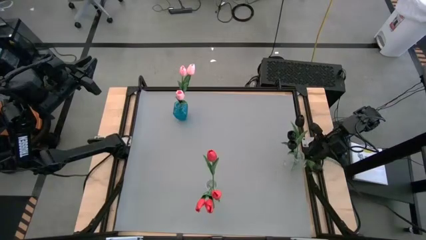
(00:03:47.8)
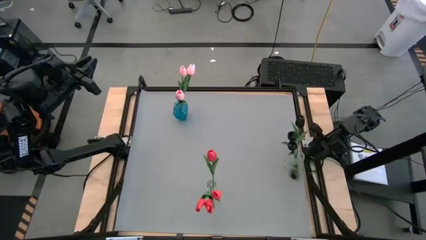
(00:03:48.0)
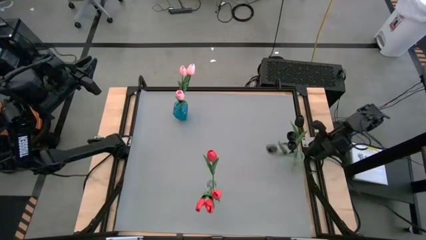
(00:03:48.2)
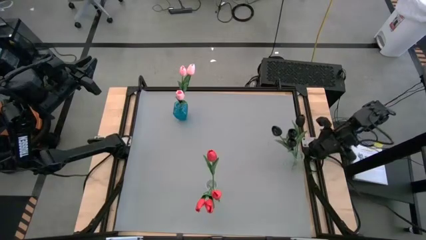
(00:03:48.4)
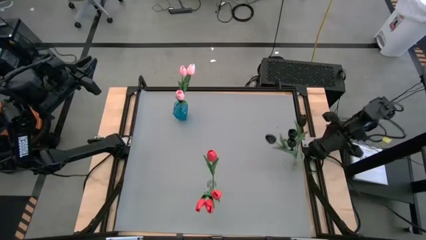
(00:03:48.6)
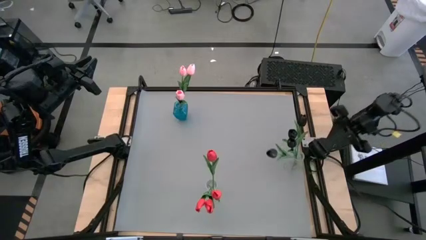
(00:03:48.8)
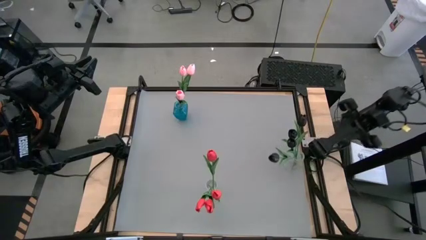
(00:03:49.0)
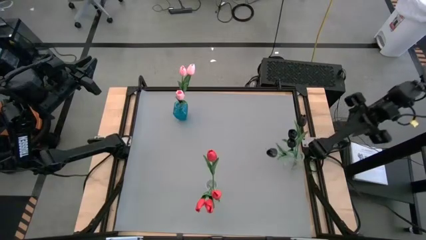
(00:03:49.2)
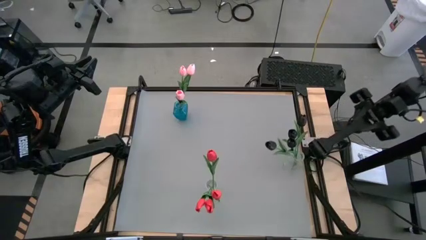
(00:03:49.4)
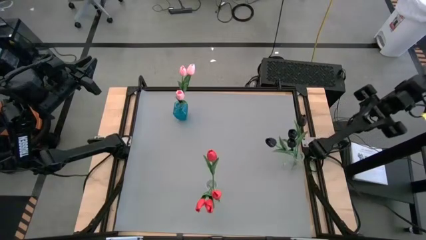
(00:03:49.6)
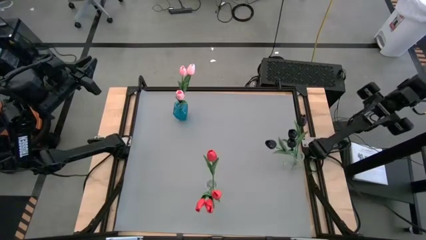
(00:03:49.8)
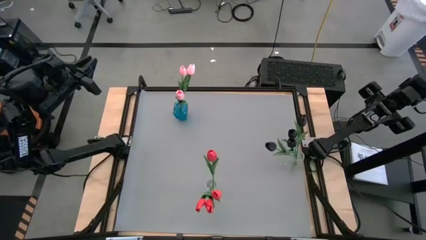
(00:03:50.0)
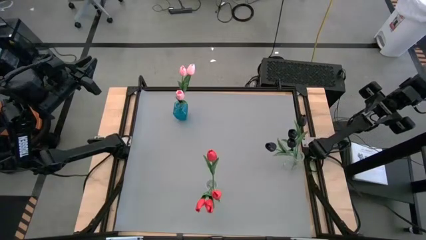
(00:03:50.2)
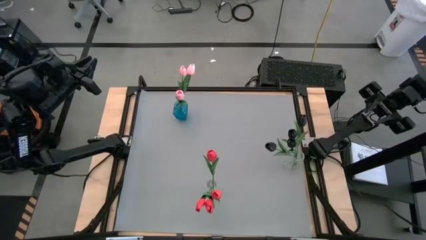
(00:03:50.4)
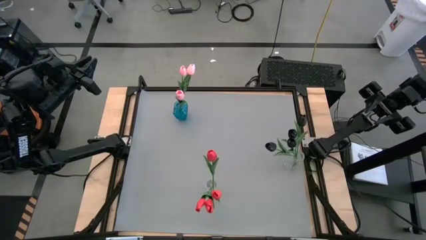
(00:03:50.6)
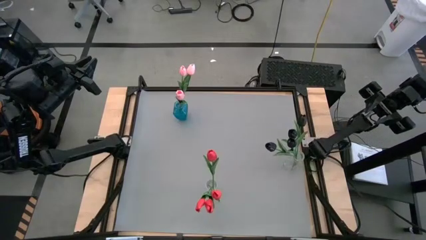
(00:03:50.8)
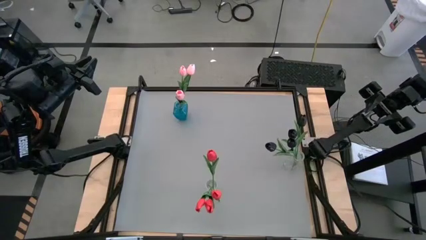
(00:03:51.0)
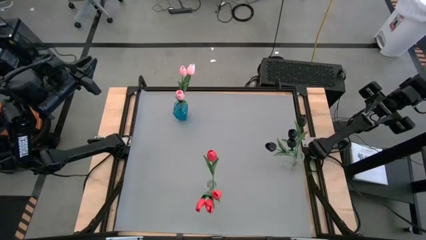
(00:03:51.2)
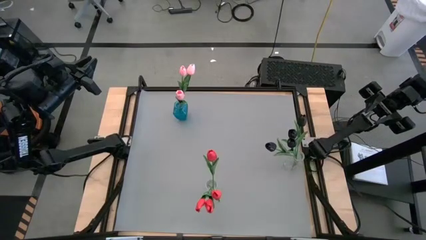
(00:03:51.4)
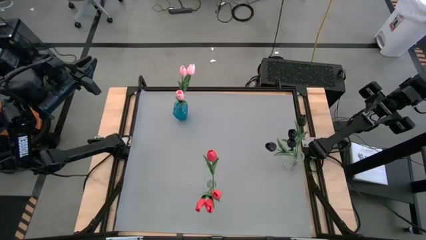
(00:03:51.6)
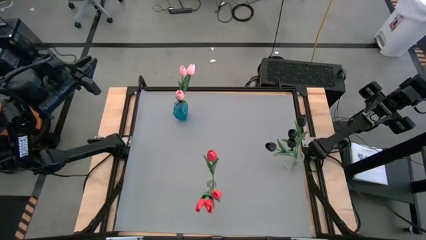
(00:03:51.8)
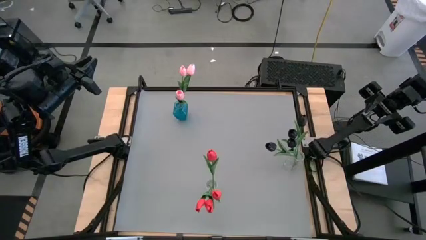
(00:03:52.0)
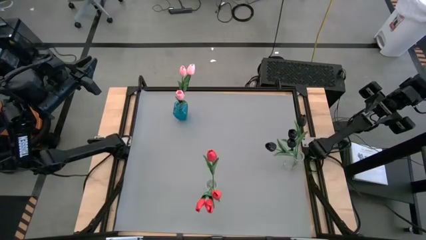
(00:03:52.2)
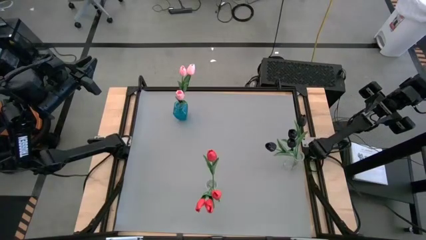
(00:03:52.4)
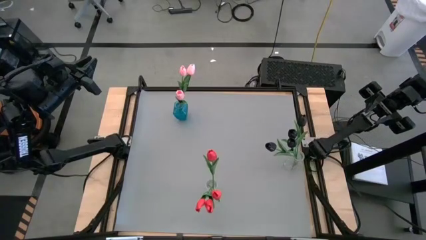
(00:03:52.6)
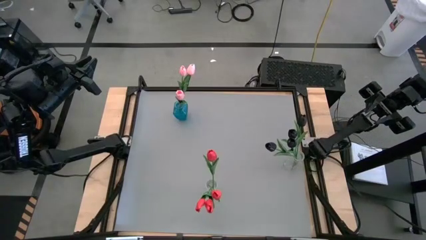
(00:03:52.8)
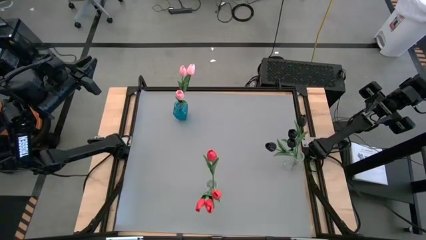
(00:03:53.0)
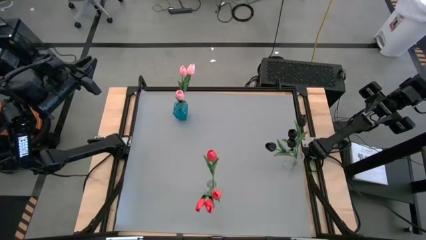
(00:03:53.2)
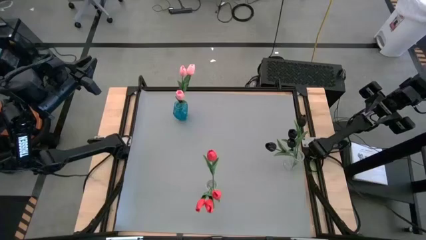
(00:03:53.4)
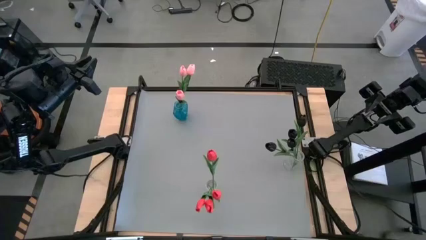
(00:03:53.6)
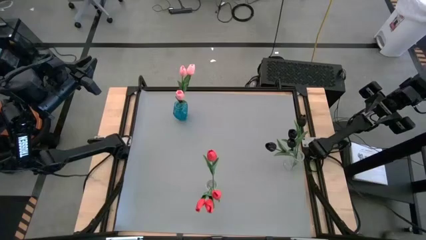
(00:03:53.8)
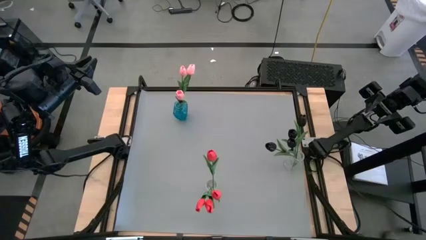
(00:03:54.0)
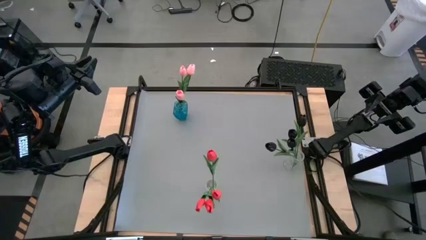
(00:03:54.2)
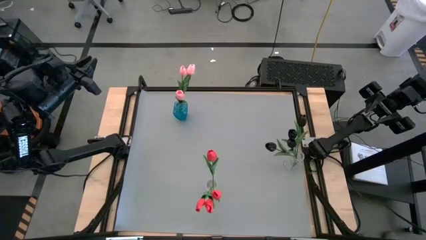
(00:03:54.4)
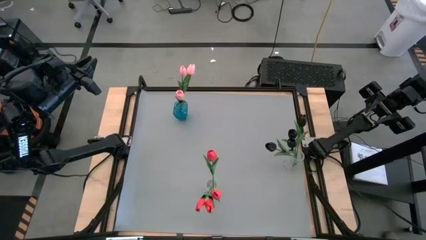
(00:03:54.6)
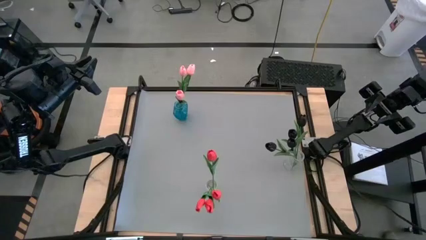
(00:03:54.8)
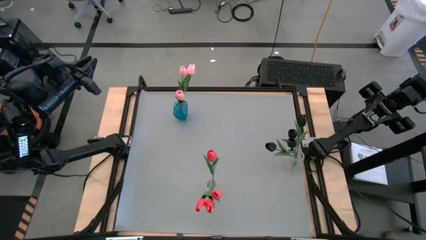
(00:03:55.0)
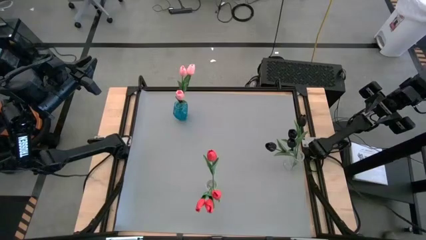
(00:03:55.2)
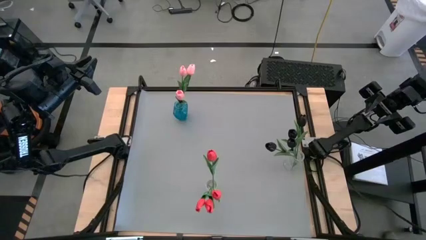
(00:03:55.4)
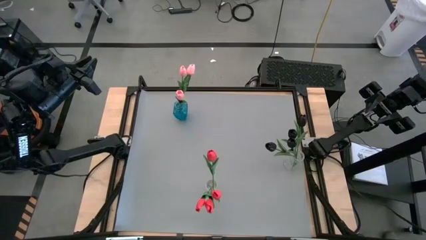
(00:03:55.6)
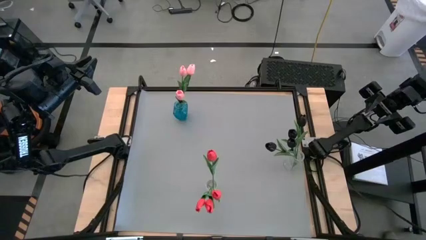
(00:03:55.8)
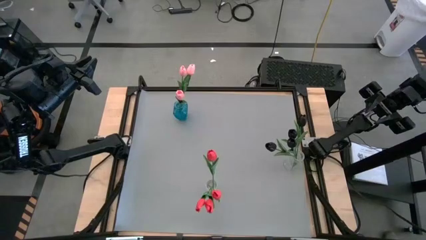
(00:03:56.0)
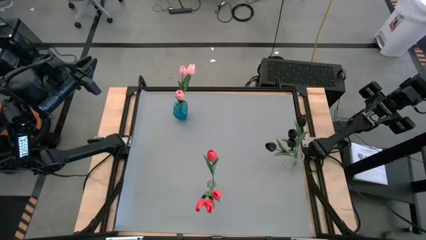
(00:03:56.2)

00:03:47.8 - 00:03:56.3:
Task: Sort flowers into vase by color
Return to Home Position

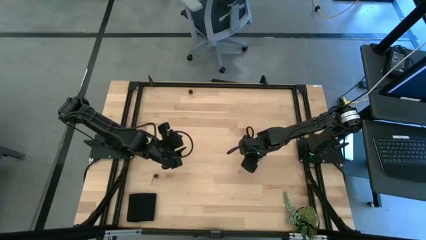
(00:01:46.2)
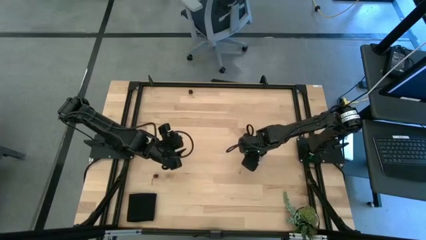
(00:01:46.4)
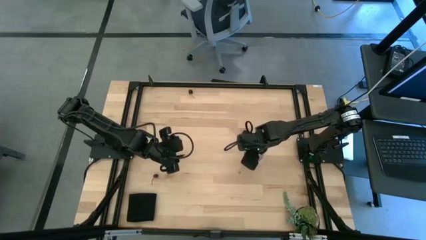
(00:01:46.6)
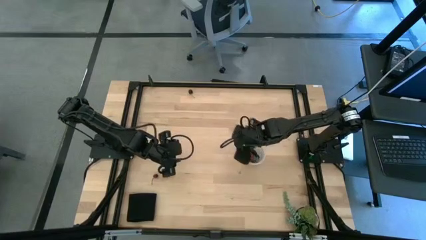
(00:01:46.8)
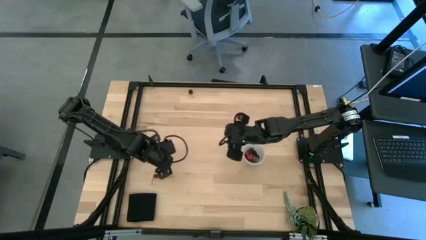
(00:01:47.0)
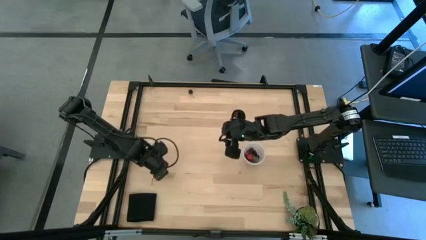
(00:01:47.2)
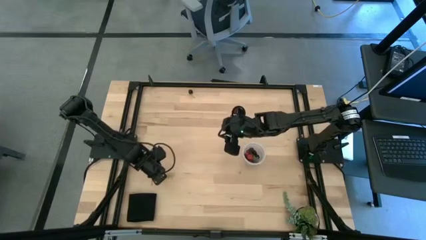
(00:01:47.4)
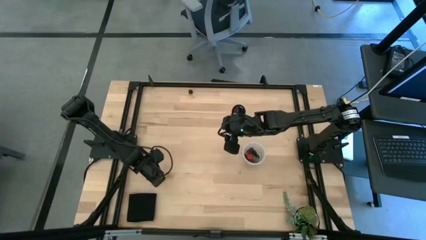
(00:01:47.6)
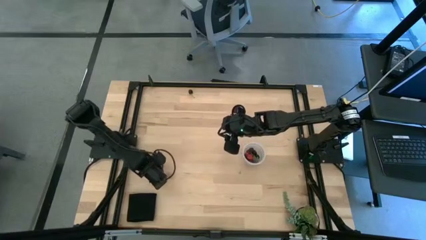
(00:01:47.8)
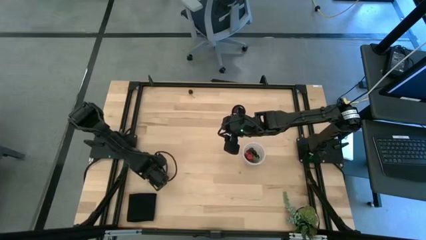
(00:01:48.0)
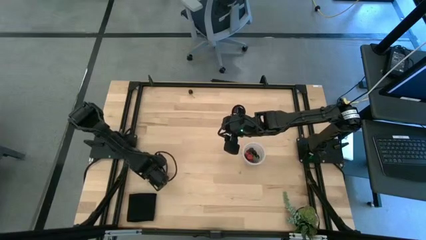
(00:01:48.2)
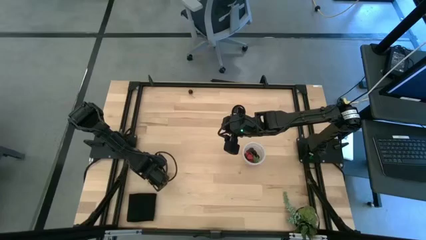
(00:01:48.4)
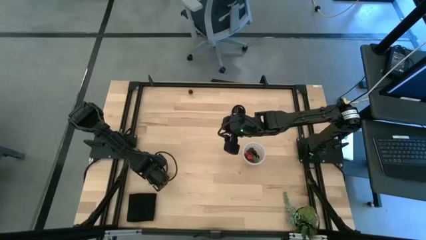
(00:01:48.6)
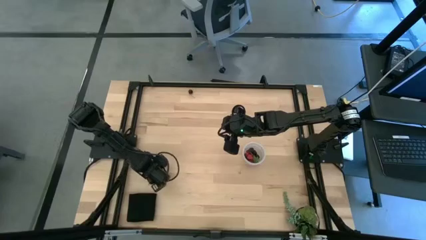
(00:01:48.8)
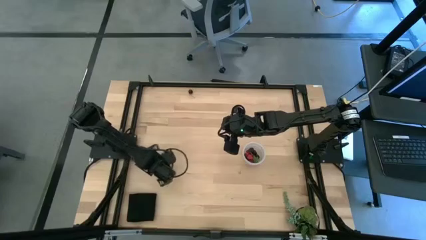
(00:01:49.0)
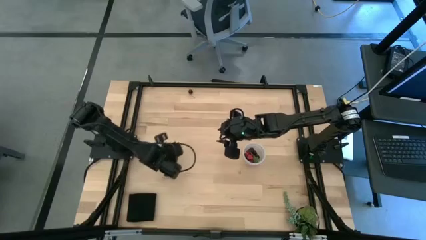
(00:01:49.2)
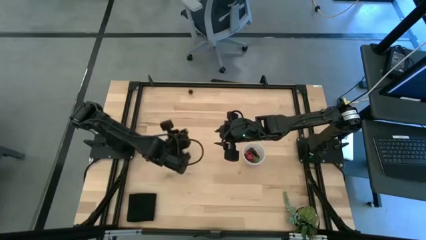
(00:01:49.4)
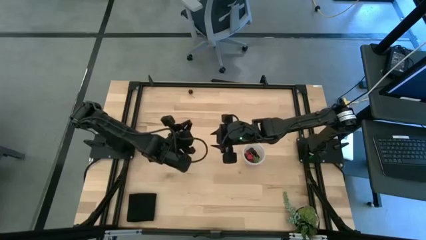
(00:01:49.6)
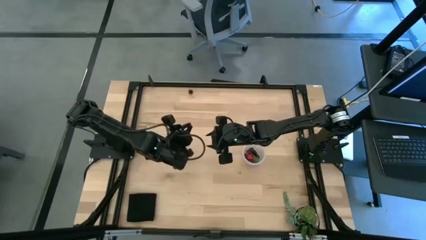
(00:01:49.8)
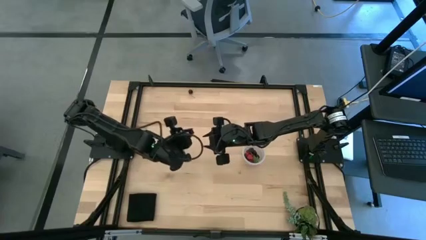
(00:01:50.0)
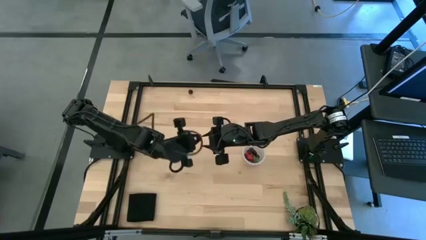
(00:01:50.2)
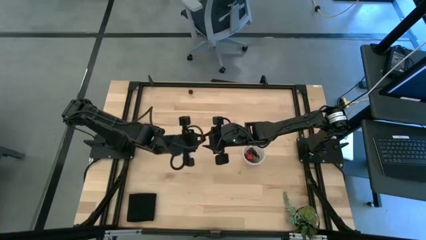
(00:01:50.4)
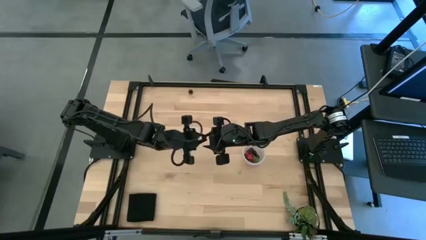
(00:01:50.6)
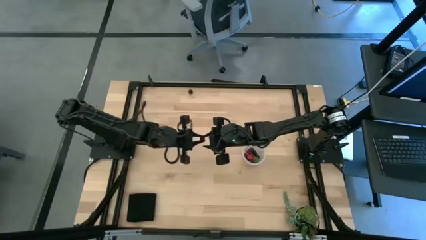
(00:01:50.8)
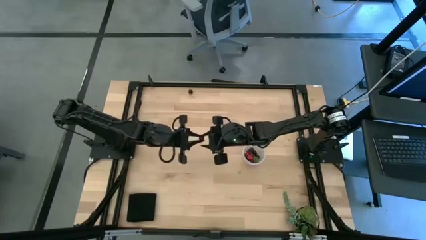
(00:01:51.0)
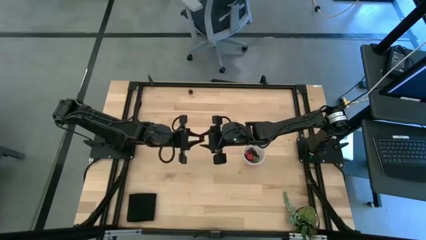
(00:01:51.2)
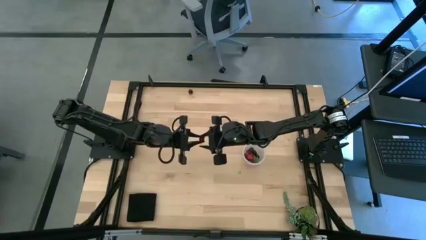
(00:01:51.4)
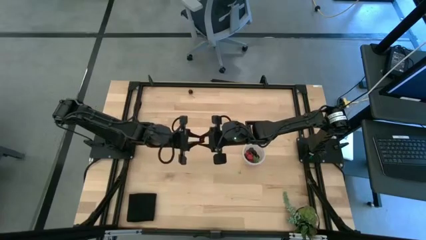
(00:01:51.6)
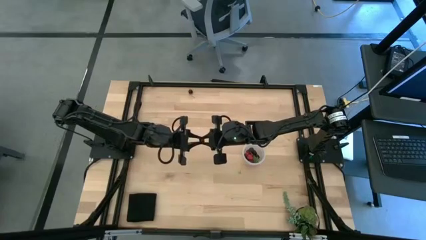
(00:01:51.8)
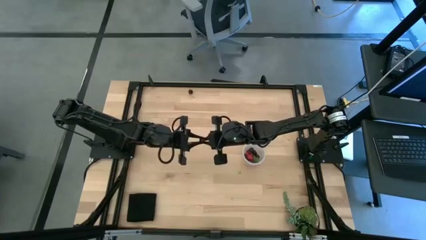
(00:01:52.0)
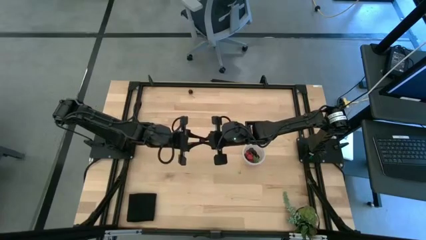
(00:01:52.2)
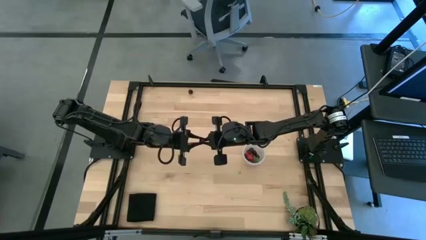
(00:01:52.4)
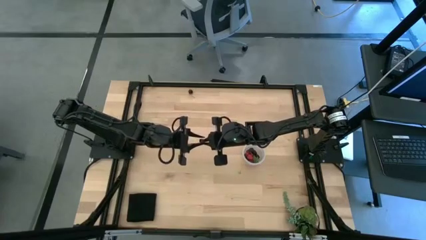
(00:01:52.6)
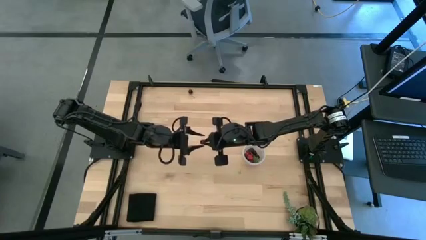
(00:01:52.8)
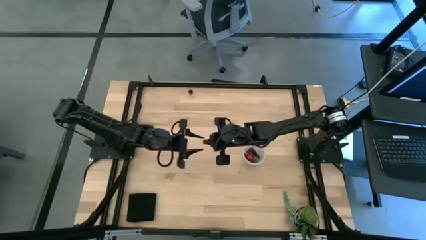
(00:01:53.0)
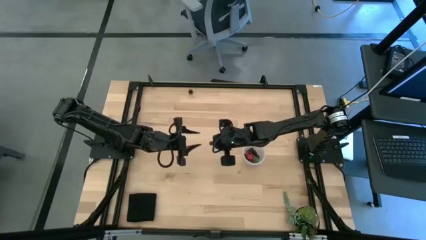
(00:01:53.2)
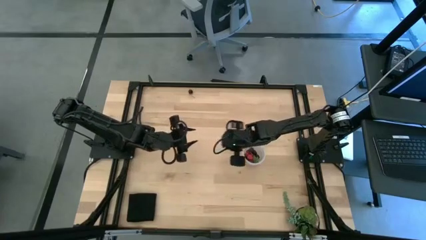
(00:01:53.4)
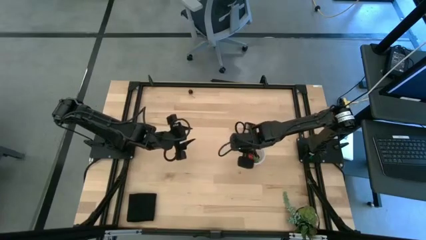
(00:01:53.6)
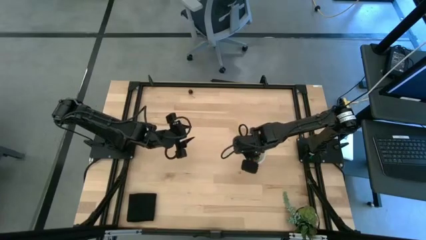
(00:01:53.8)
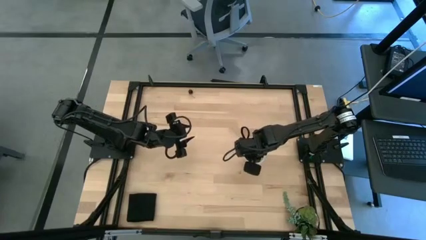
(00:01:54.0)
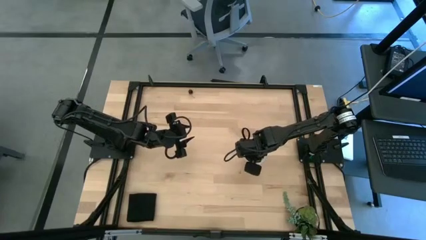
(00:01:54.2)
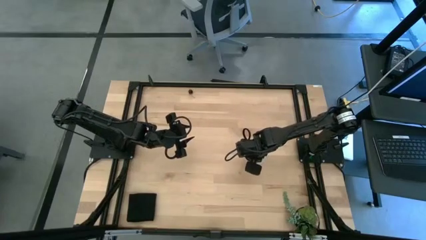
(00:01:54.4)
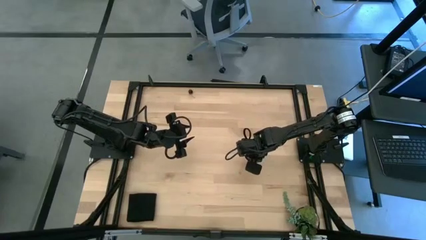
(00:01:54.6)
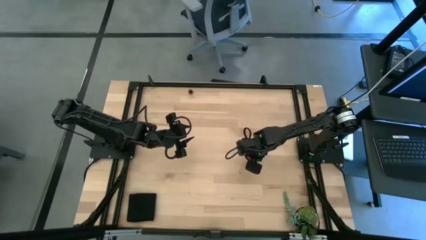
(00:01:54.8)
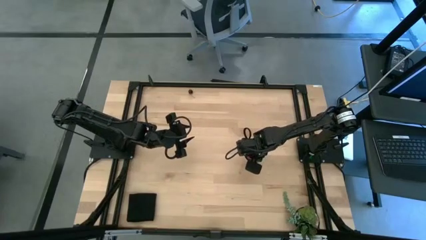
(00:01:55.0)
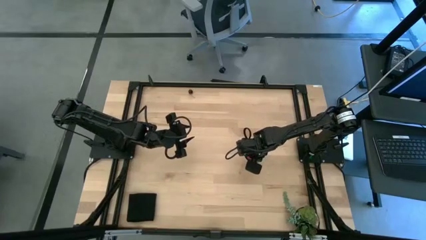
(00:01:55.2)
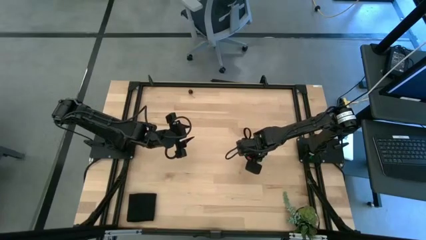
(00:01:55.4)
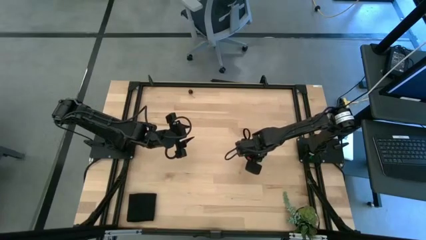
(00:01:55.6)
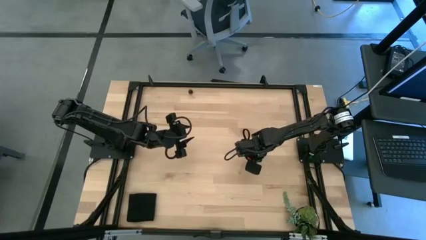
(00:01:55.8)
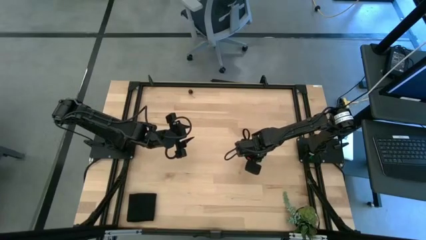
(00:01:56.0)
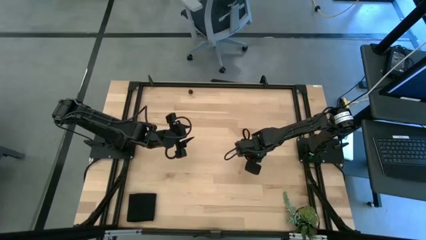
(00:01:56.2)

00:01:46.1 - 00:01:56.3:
Task: Pick and placing Produce into tupperware
Put the red cherry into the transparent bucket
